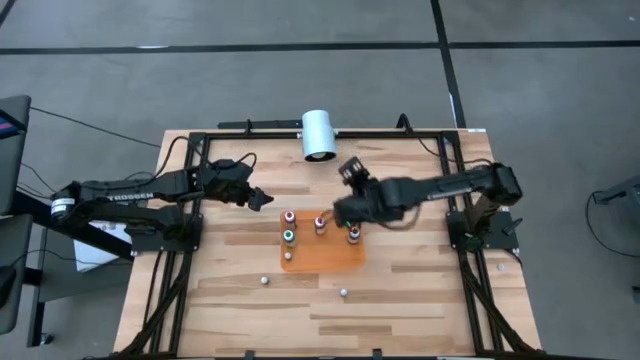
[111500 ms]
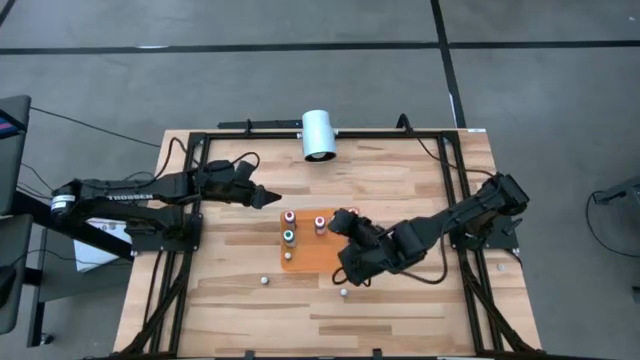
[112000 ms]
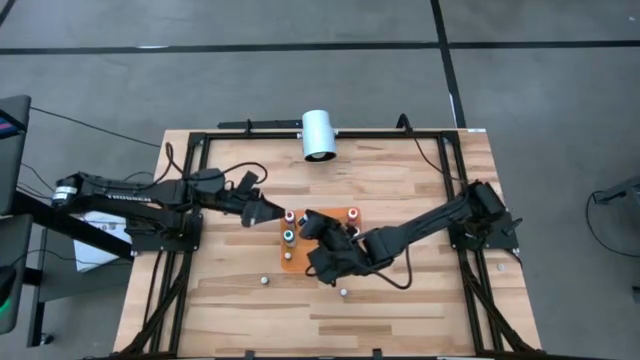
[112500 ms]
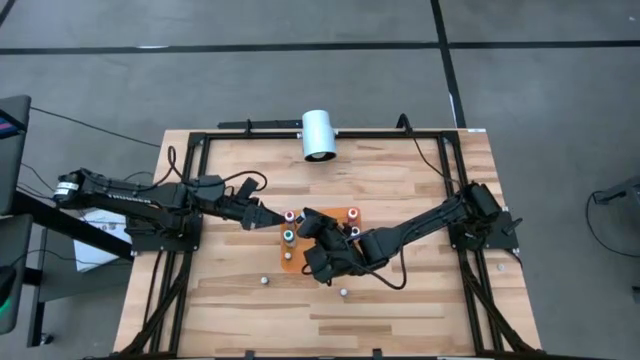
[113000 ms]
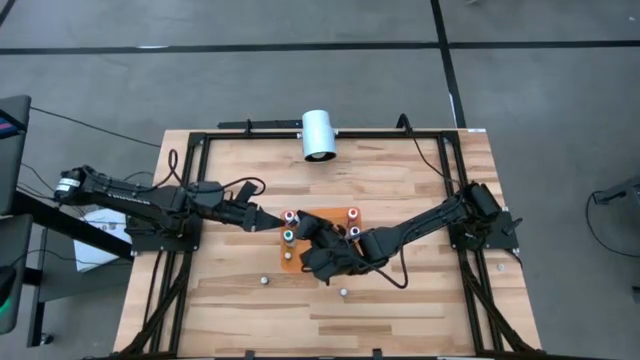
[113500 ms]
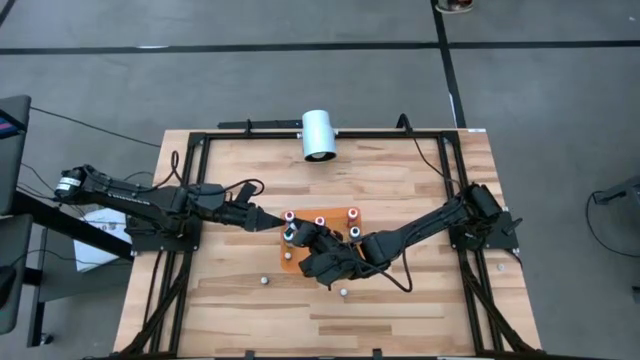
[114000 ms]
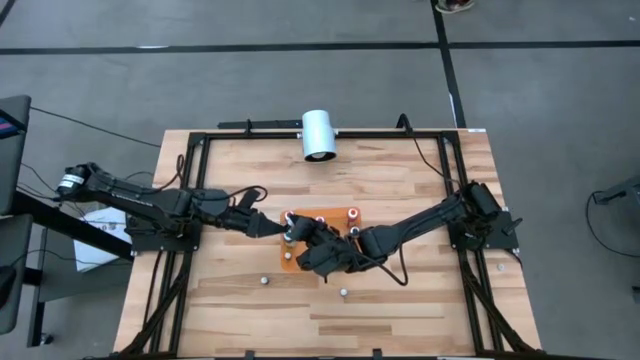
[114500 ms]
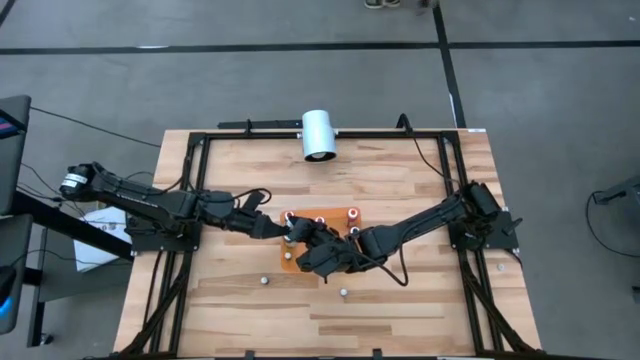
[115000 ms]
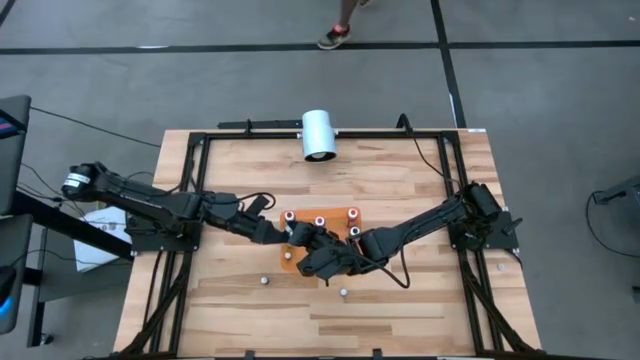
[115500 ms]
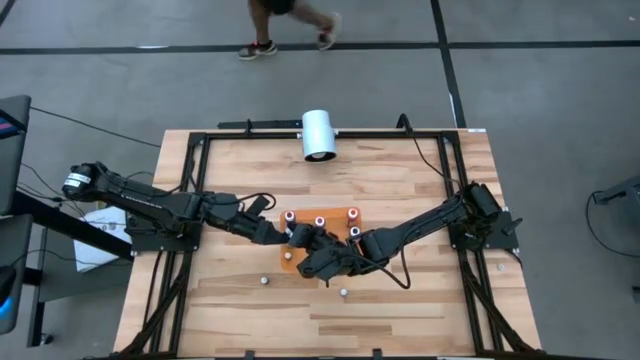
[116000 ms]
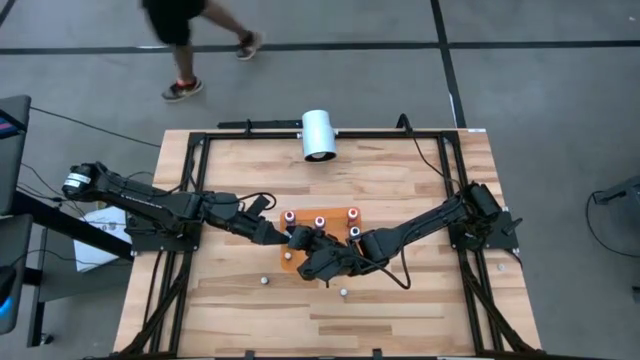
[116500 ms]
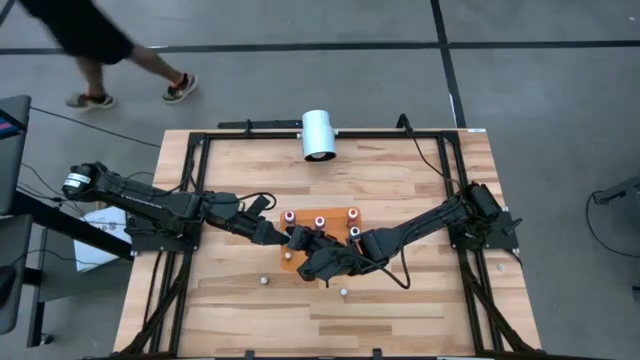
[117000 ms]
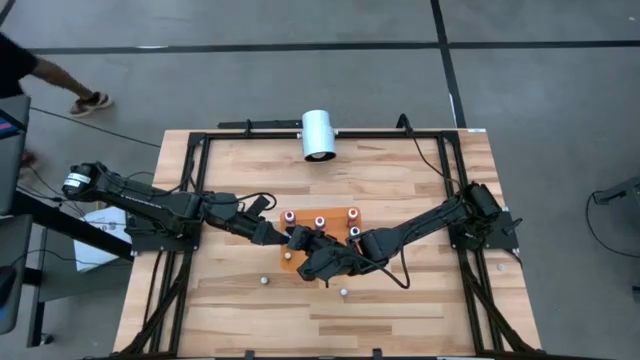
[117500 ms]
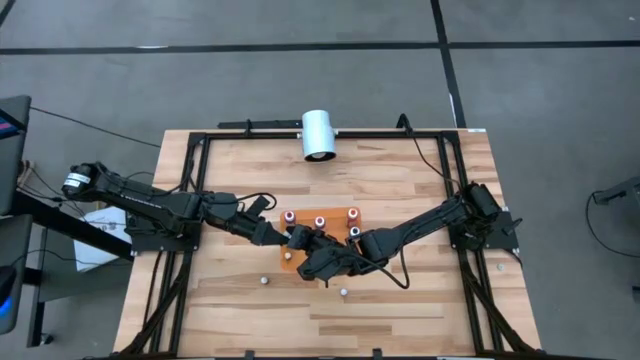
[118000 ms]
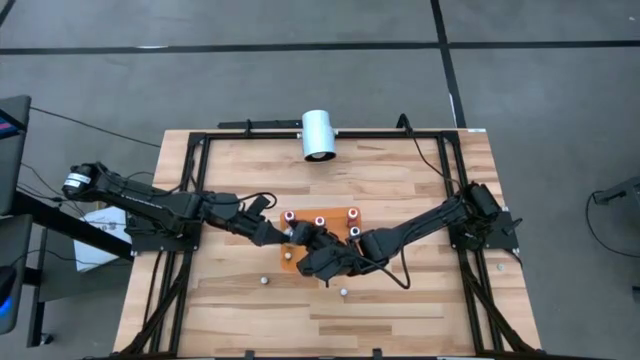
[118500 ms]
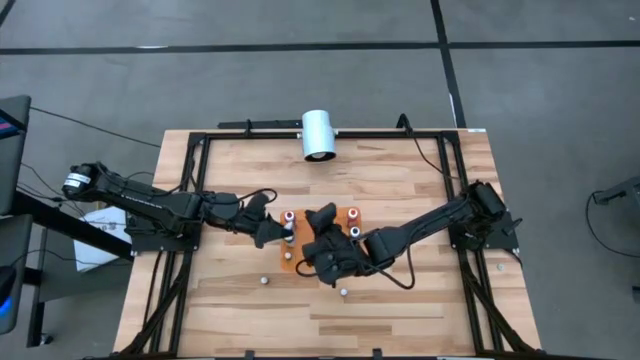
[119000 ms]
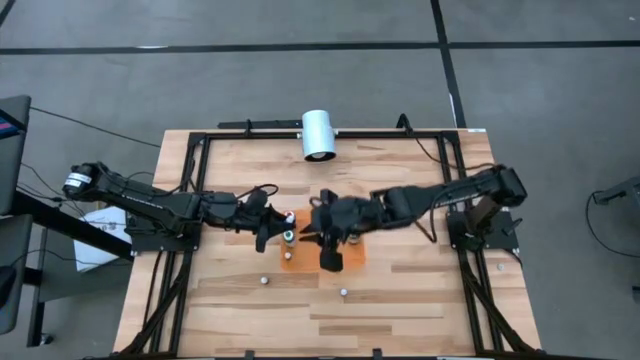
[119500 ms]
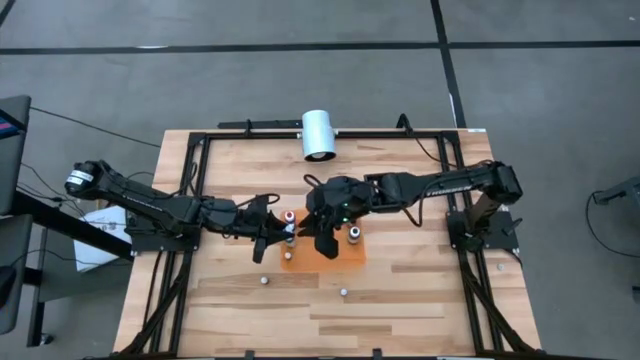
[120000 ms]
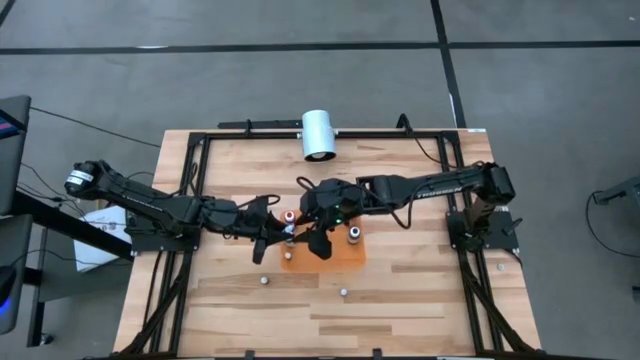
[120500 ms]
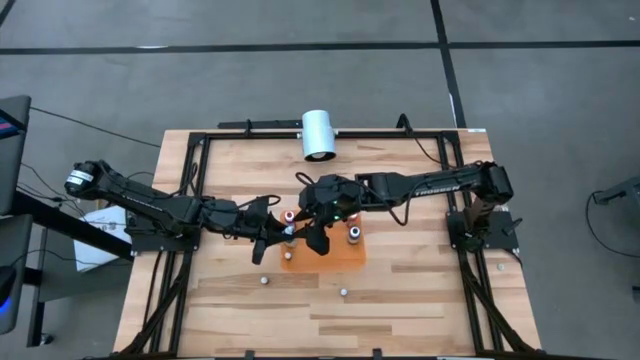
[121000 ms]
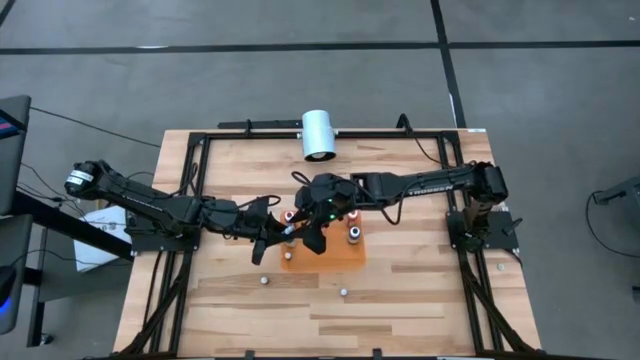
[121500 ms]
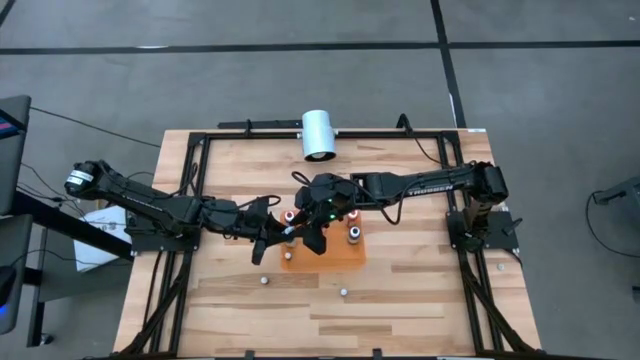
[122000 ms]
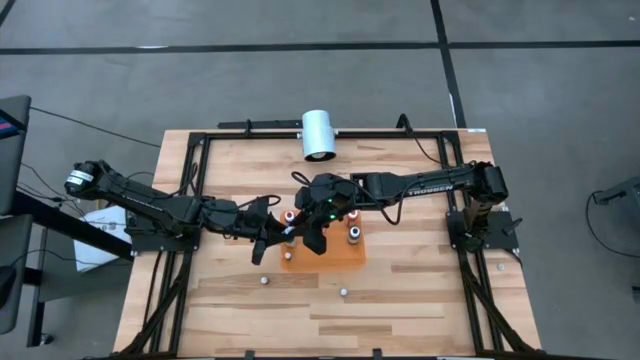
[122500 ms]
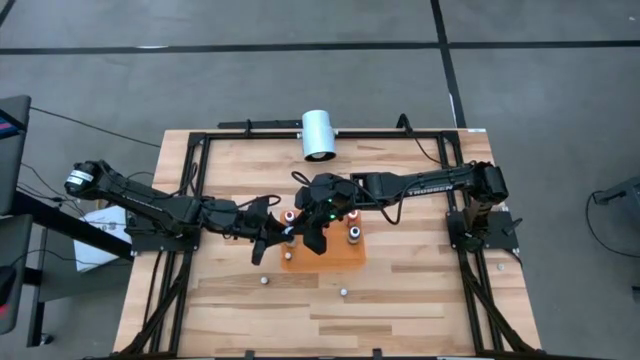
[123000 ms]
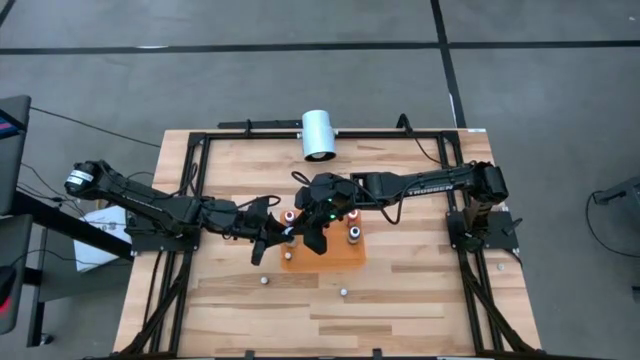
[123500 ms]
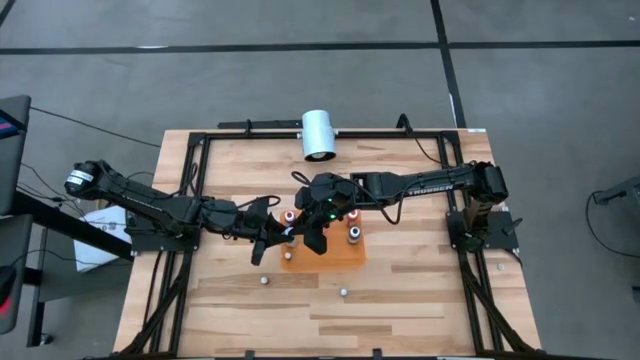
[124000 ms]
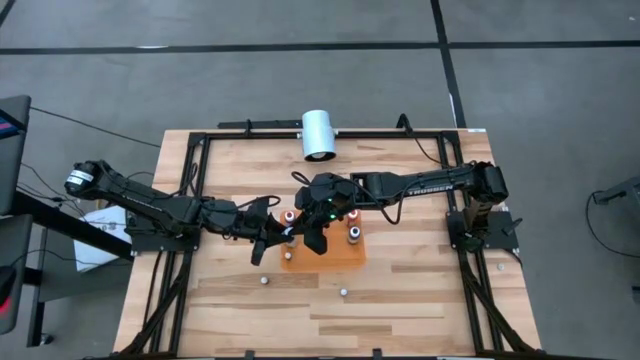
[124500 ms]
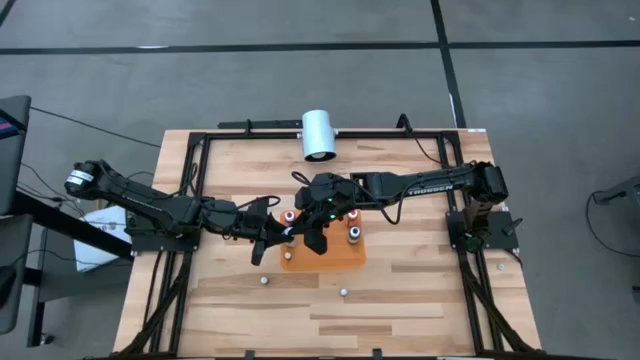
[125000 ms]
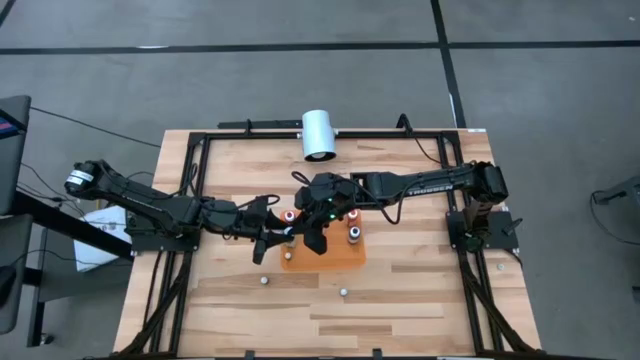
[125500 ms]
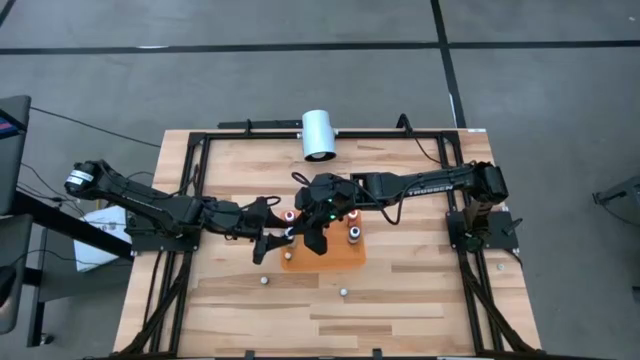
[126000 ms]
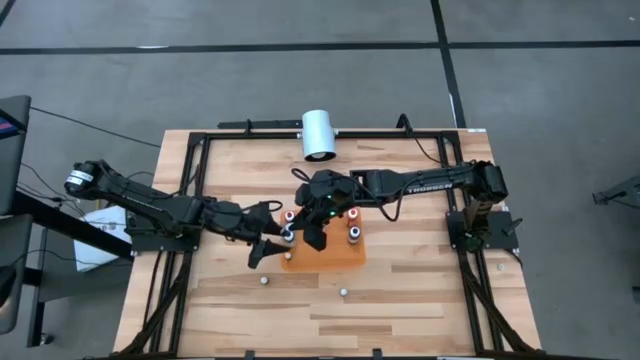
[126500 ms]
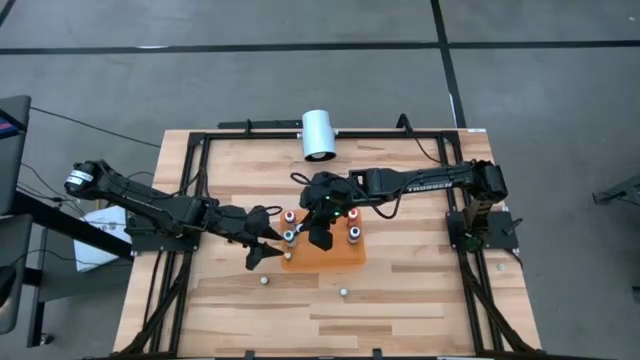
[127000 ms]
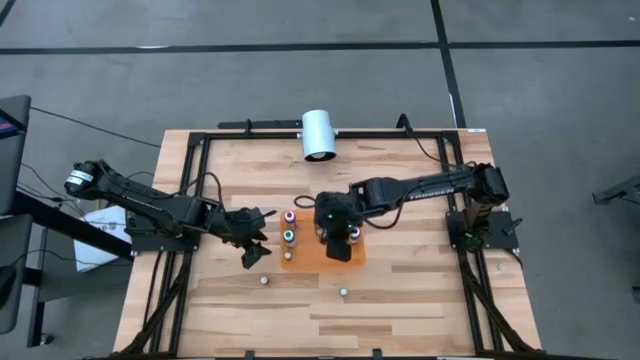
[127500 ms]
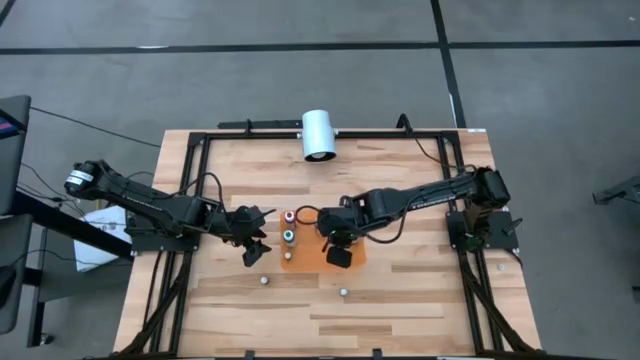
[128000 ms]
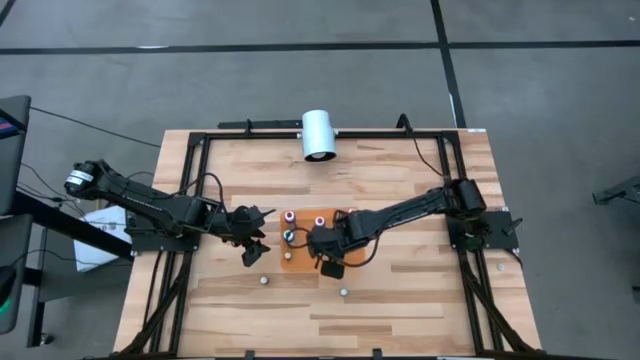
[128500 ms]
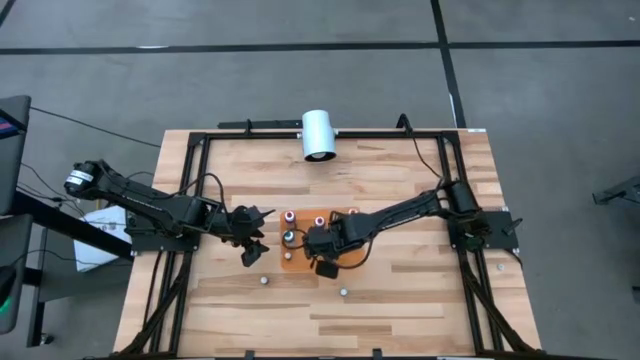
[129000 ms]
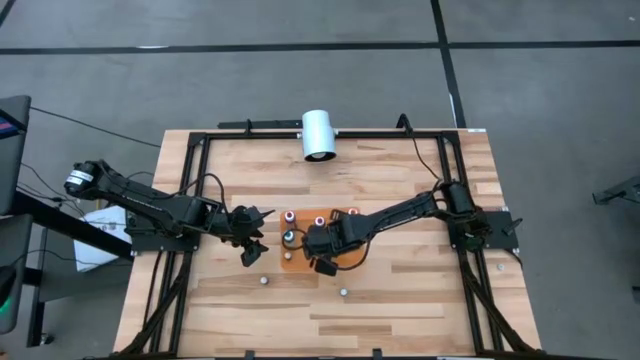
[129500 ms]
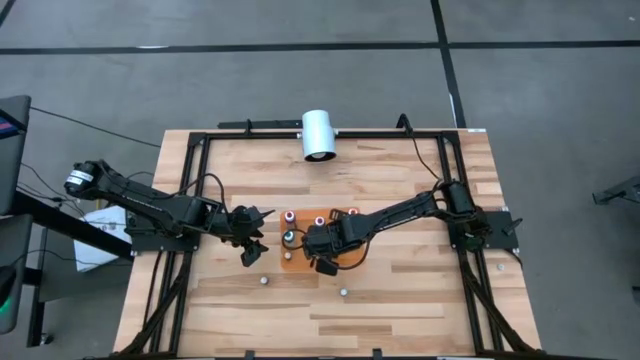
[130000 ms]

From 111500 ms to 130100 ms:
Task: Pick & Place food coloring
Put the small brown food coloring bottle into the orange container
